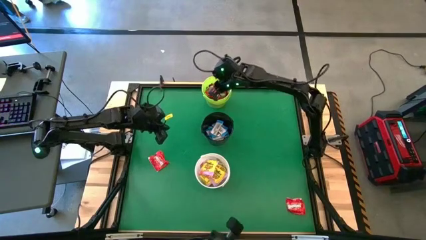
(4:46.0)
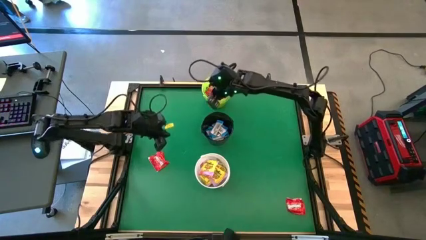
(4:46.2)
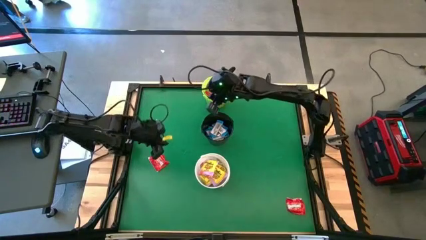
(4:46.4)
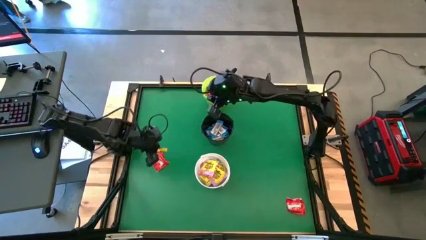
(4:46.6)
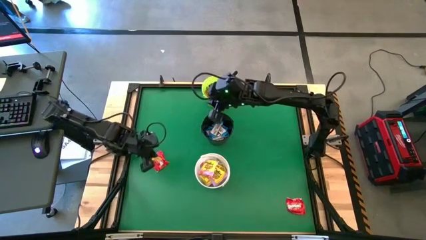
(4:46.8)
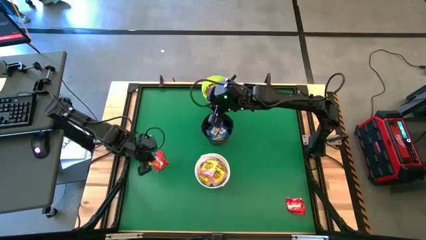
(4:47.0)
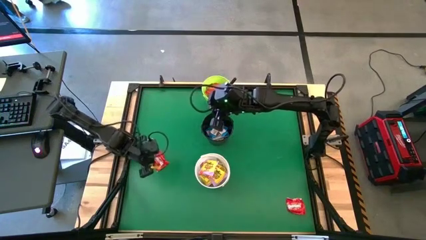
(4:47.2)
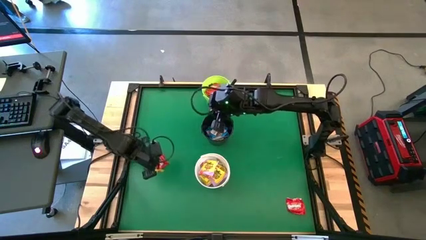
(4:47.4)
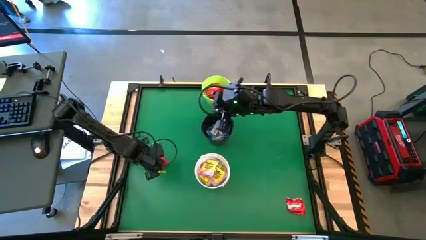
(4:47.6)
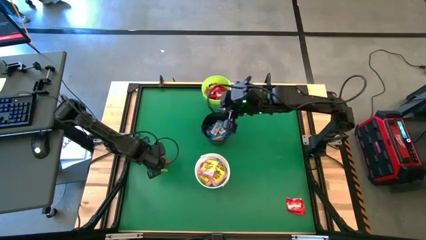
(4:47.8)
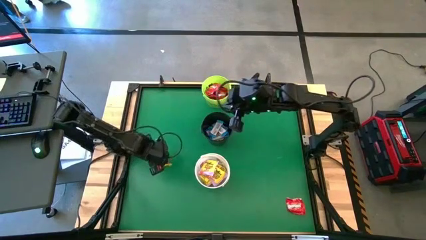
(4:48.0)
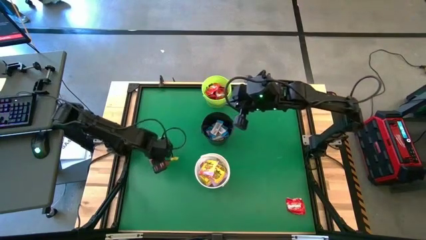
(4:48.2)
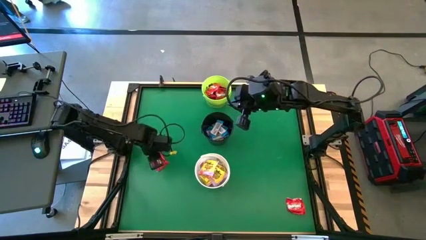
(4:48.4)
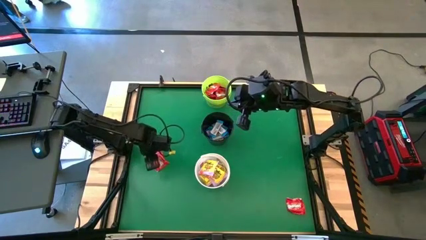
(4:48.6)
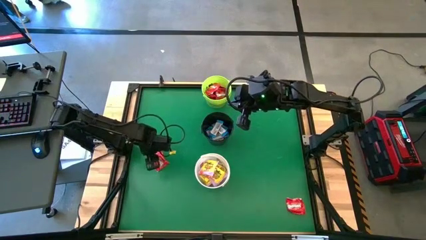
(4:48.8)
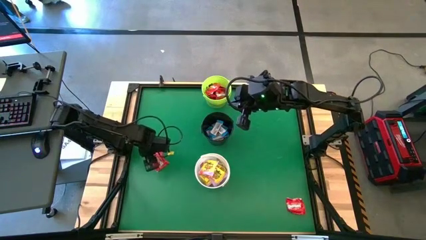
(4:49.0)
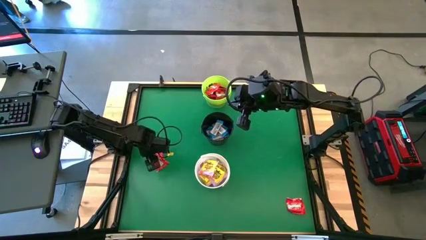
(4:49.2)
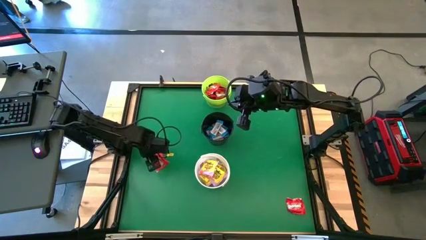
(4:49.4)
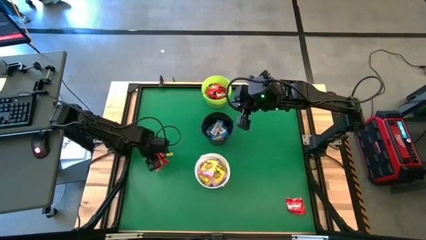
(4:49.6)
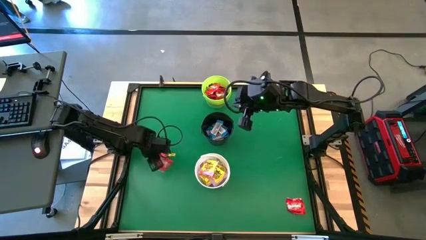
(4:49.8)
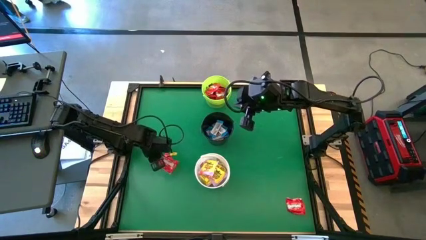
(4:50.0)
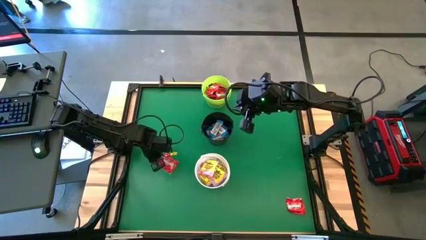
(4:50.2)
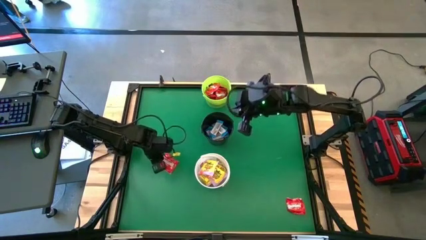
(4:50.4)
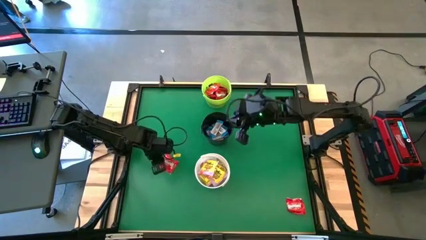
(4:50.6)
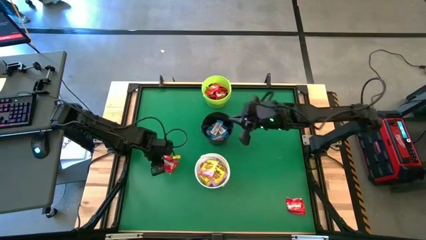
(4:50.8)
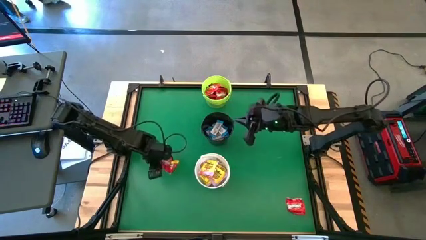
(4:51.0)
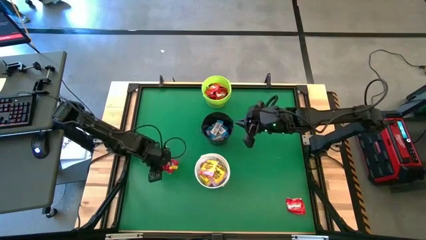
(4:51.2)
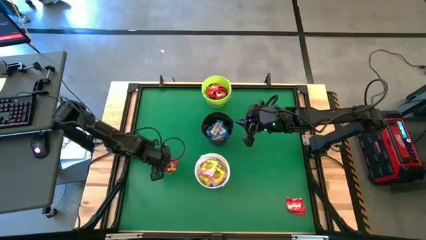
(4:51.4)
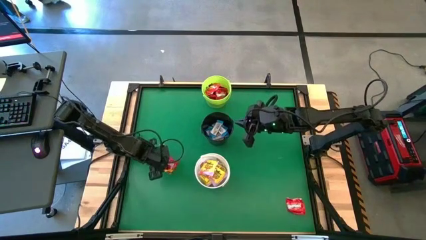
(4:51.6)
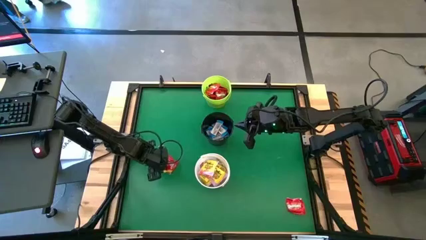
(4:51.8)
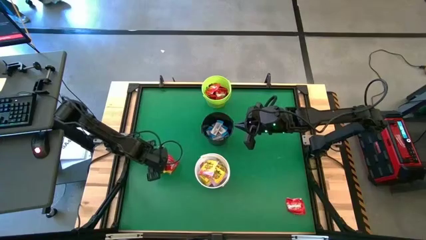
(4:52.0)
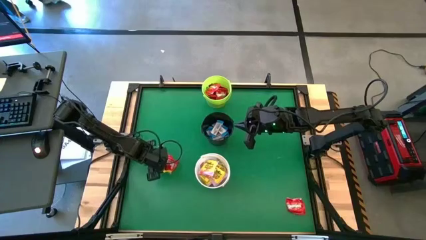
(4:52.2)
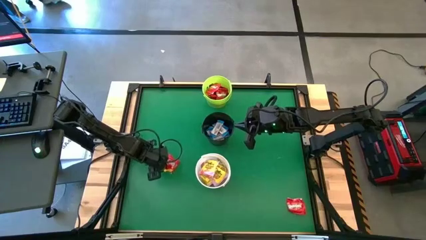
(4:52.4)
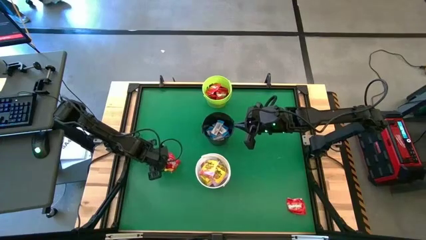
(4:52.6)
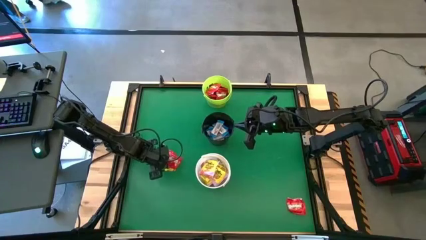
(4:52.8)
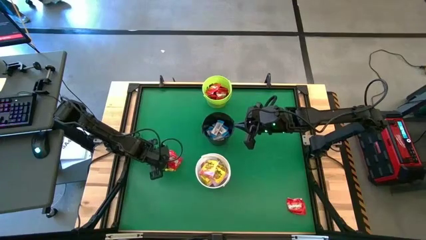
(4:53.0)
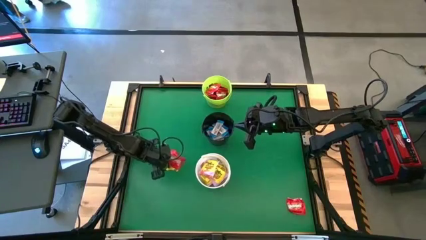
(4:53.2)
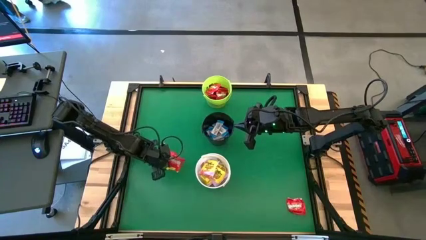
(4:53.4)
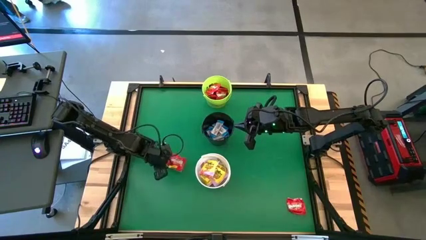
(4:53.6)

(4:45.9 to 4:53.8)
Task: Sort candy by brand, put in halloween buckets
Put the red candy into the green bucket

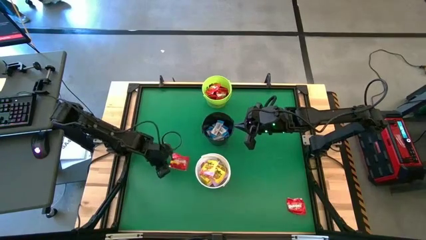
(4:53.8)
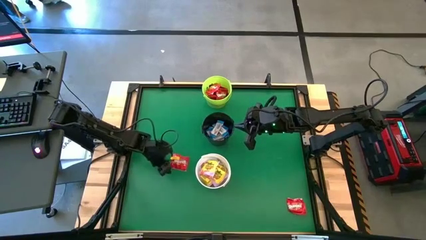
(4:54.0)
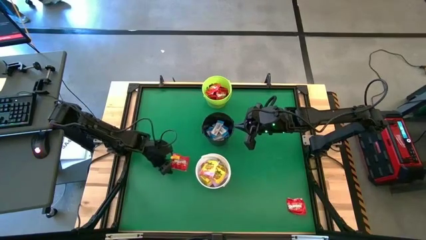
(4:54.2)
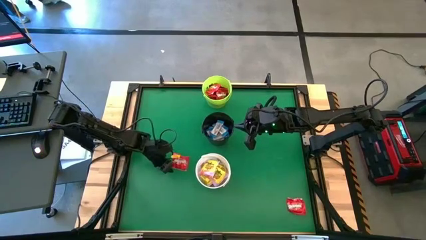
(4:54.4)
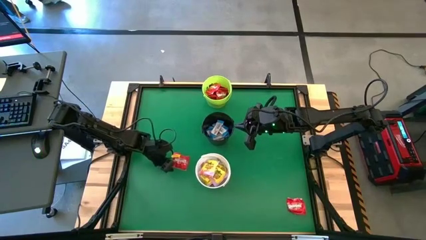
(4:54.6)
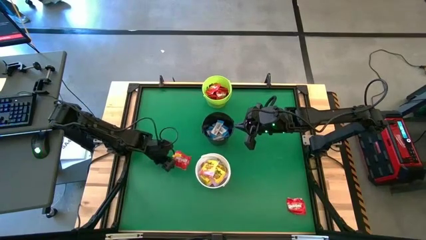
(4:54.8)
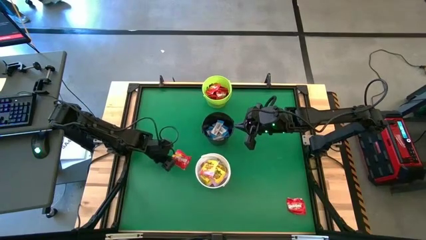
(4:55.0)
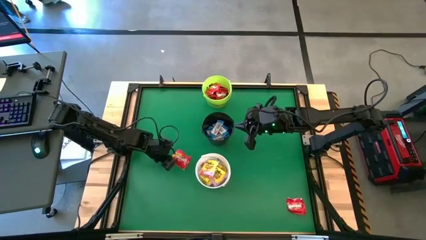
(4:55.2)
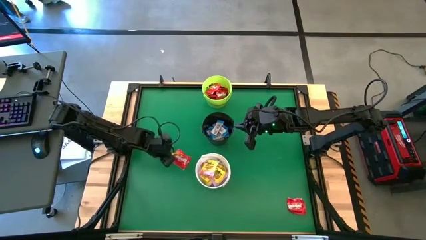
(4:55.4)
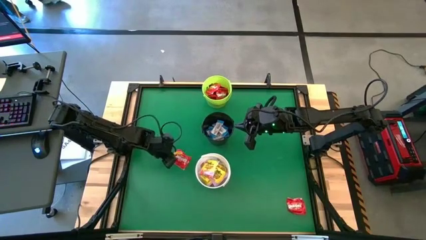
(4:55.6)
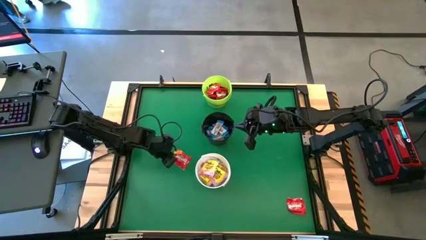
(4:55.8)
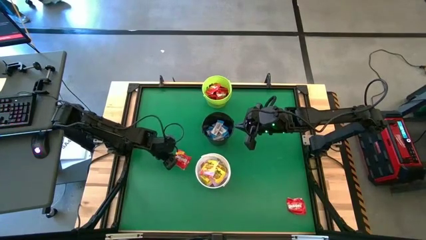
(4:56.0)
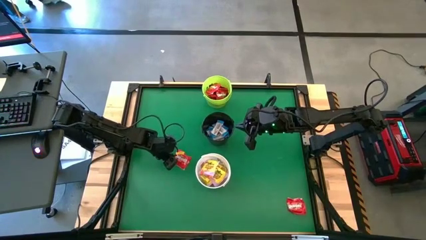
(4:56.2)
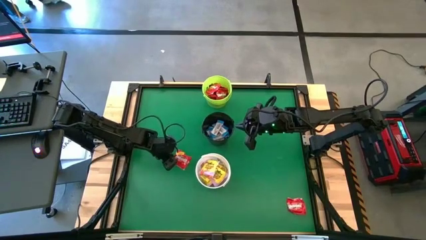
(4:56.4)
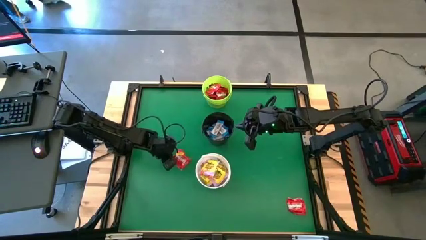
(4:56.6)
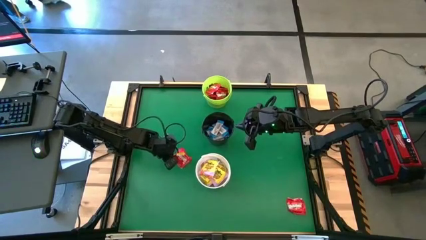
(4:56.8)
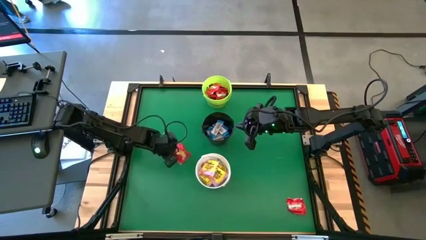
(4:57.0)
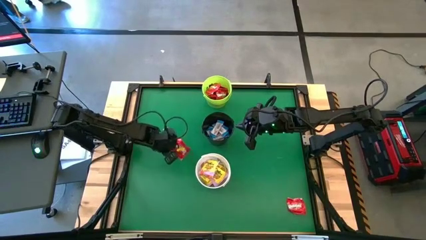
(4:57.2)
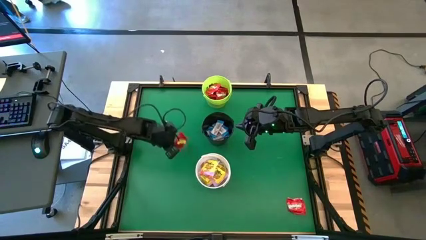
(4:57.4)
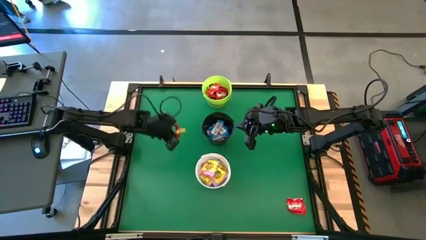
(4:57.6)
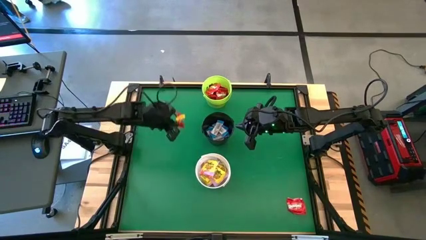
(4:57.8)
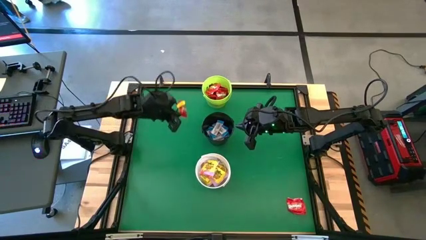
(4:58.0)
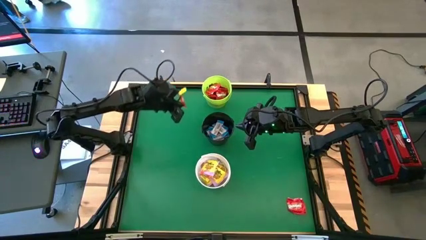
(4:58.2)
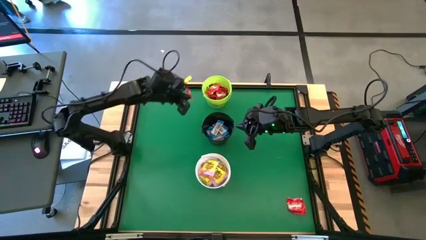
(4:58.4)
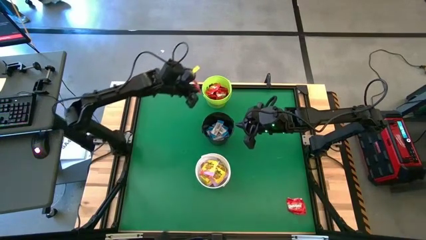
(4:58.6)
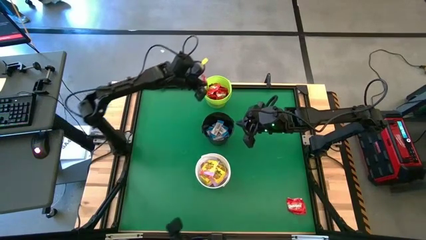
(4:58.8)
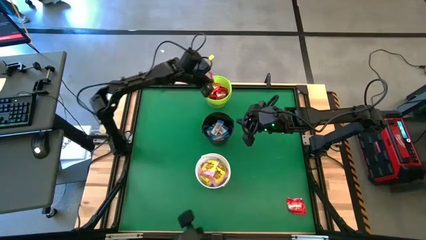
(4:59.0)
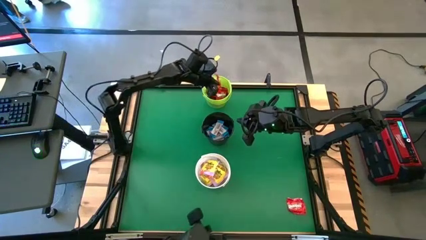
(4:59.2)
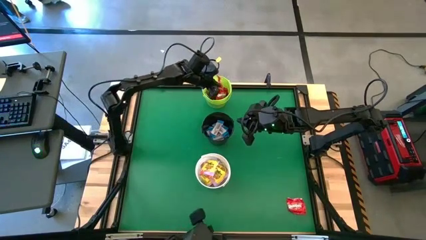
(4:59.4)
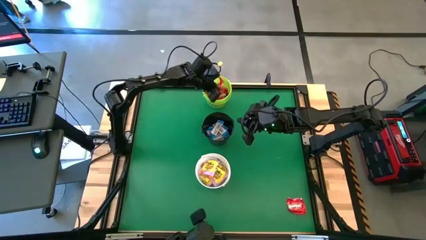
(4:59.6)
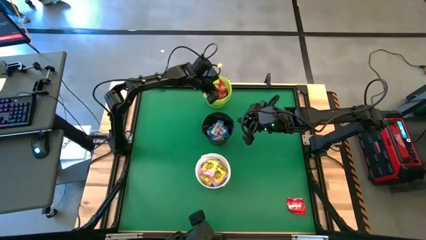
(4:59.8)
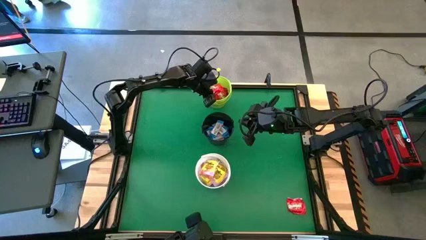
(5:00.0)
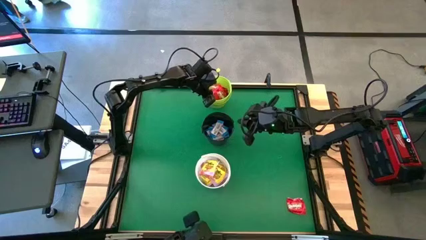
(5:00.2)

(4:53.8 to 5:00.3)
Put the red candy into the green bucket

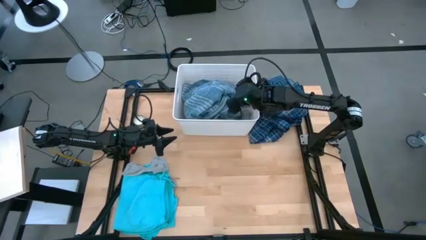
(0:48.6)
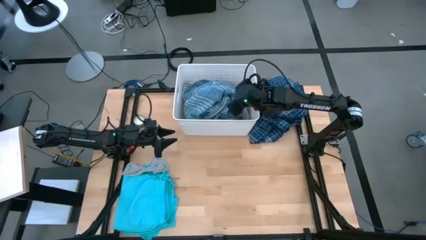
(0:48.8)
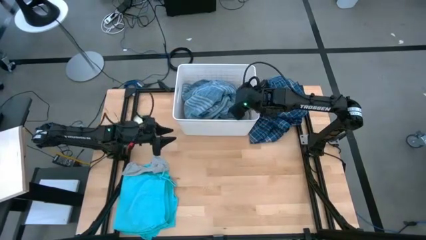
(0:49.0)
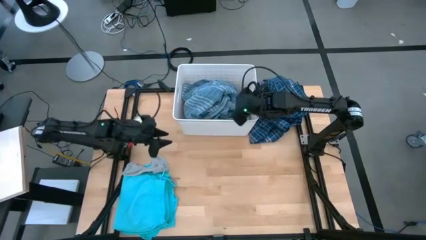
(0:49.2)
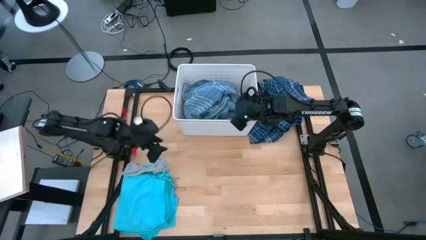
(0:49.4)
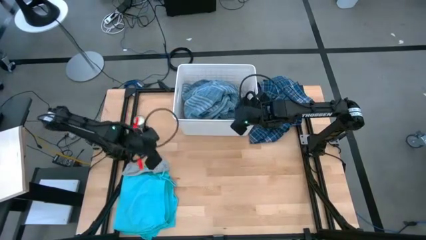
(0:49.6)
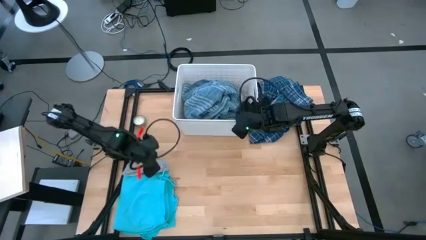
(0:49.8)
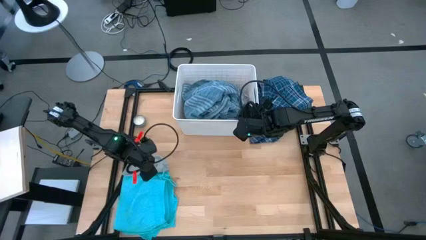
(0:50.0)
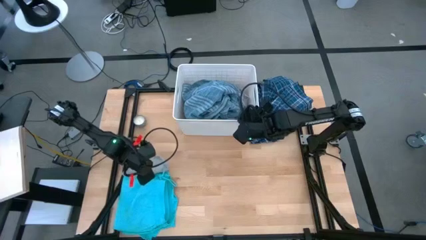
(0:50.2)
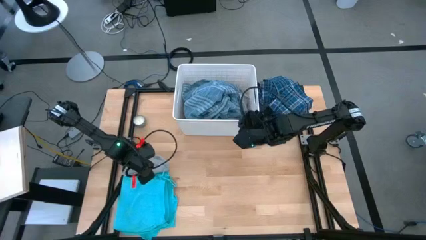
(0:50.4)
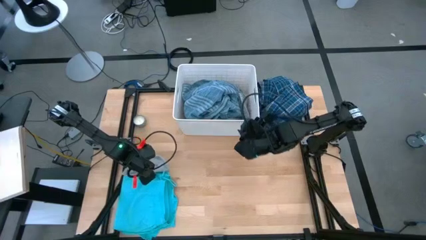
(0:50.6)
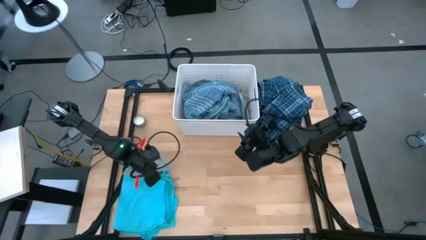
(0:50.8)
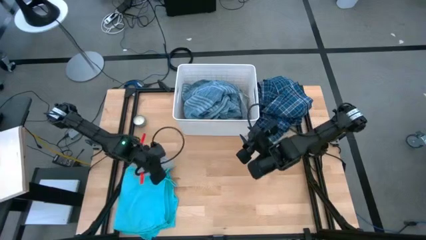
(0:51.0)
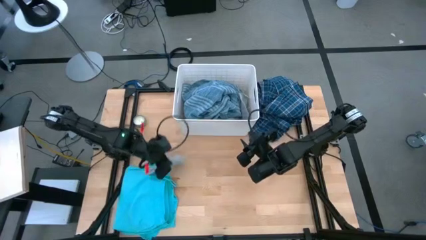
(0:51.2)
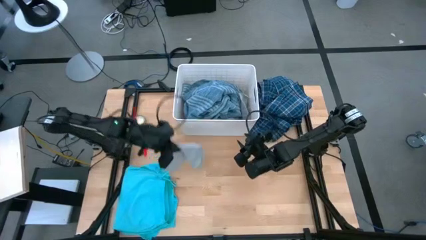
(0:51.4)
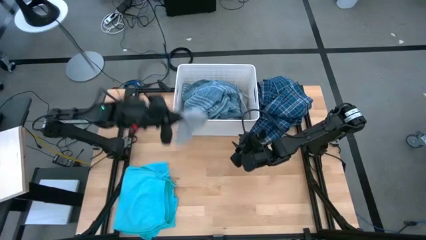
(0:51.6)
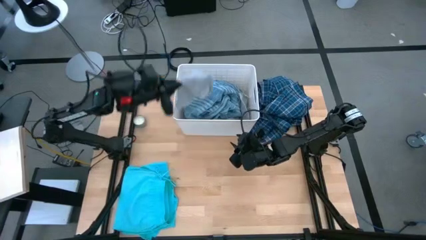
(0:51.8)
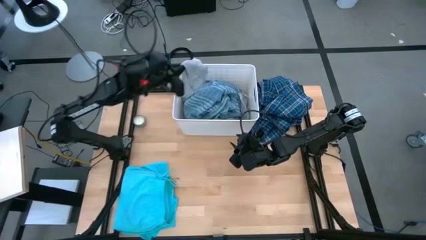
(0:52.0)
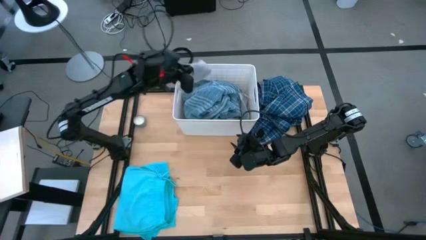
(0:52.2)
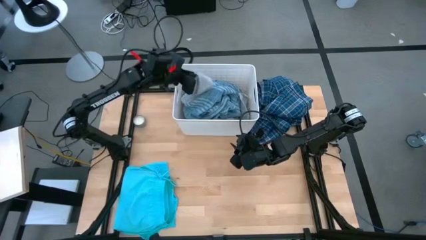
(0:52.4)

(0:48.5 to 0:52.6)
Task: Sort clothes
Put the gray sock into the white laundry bin
